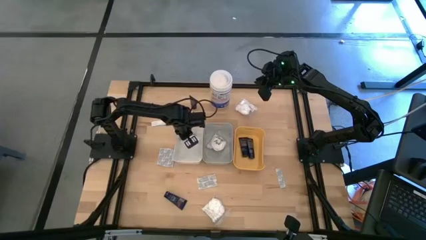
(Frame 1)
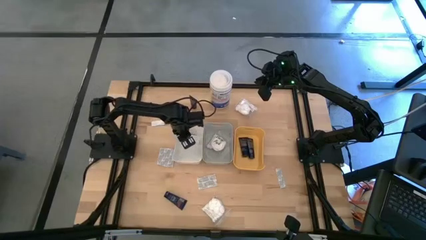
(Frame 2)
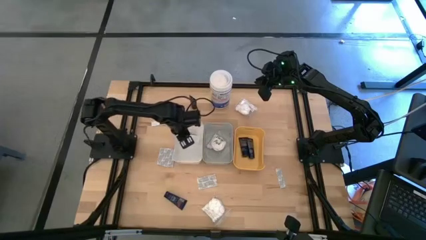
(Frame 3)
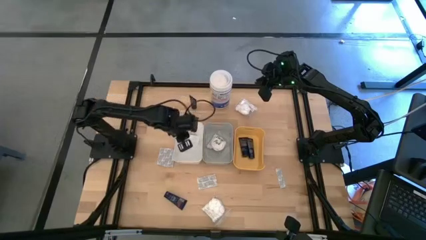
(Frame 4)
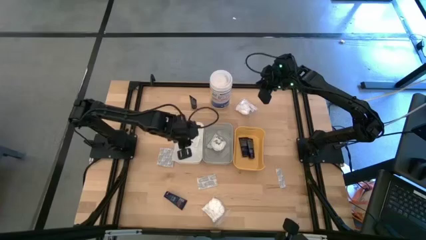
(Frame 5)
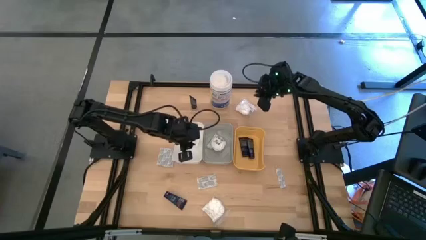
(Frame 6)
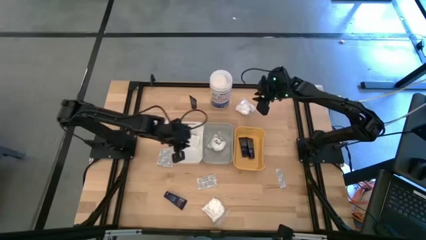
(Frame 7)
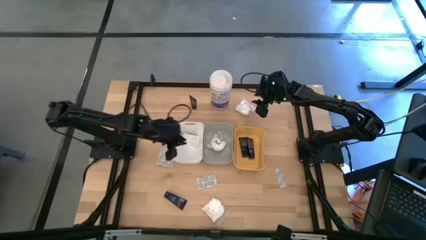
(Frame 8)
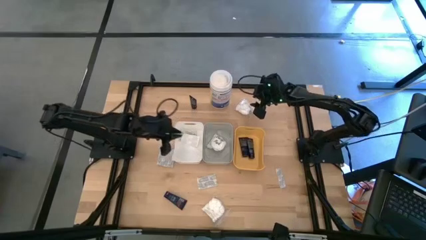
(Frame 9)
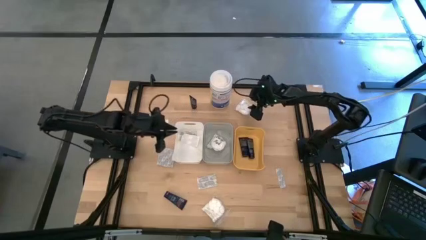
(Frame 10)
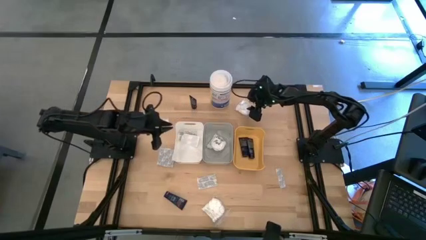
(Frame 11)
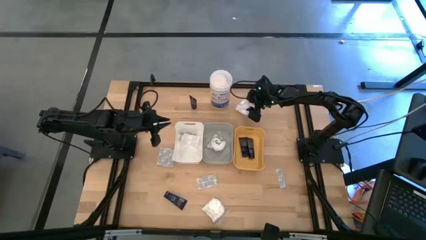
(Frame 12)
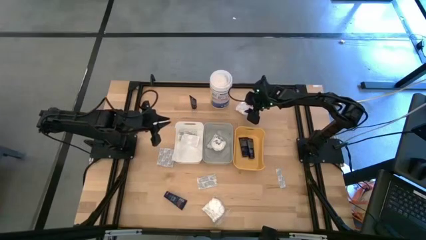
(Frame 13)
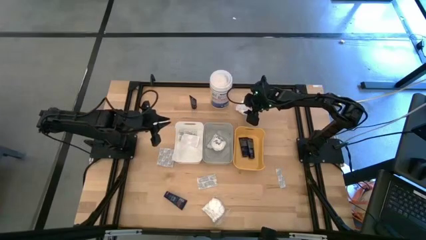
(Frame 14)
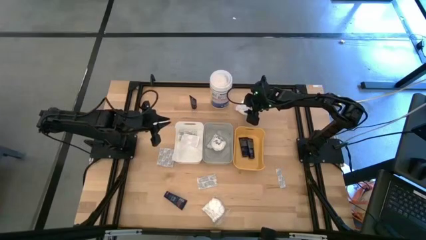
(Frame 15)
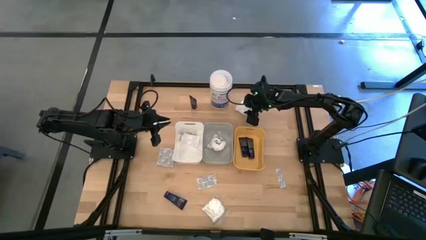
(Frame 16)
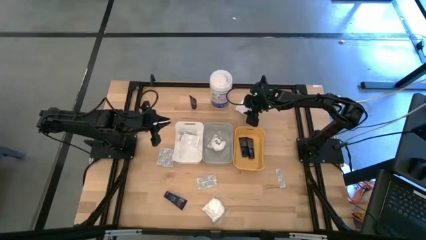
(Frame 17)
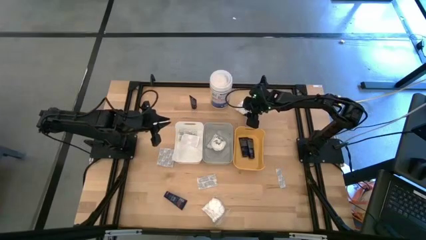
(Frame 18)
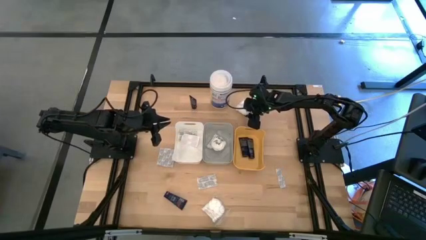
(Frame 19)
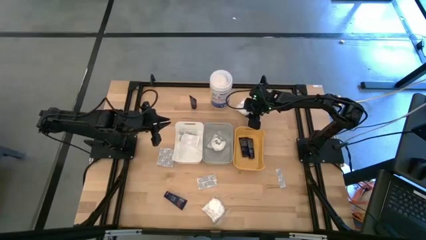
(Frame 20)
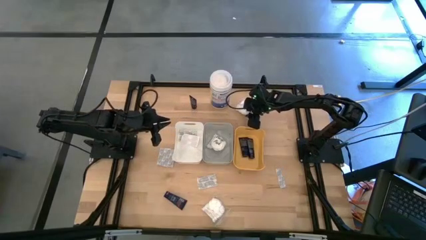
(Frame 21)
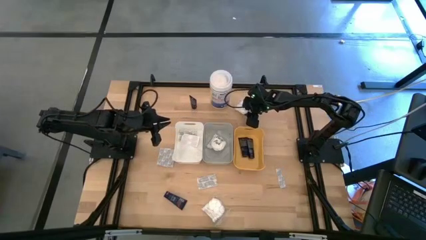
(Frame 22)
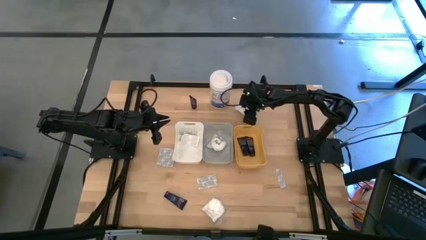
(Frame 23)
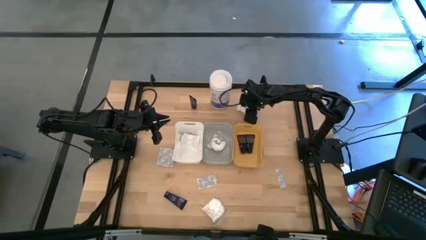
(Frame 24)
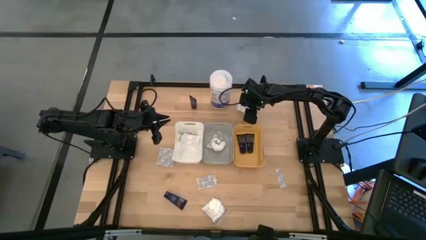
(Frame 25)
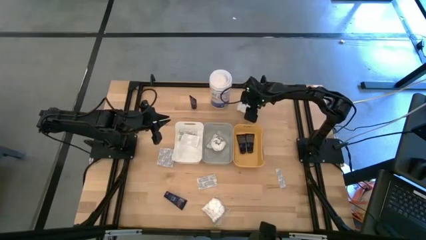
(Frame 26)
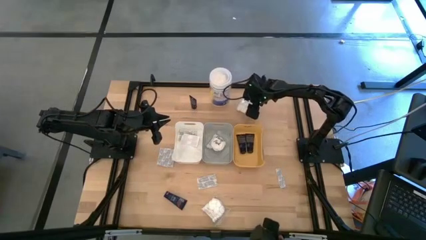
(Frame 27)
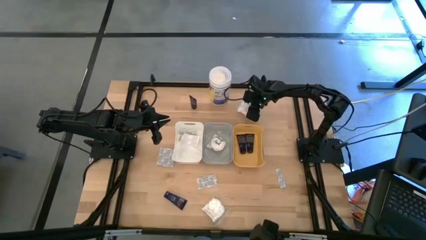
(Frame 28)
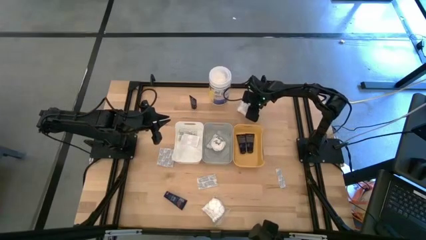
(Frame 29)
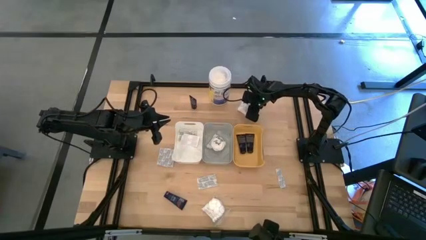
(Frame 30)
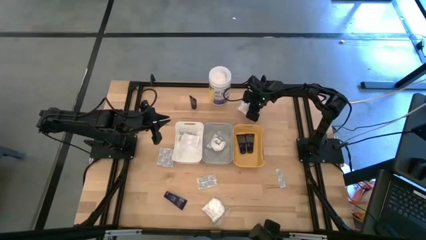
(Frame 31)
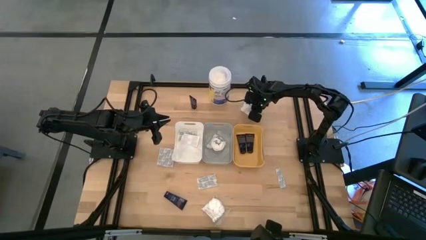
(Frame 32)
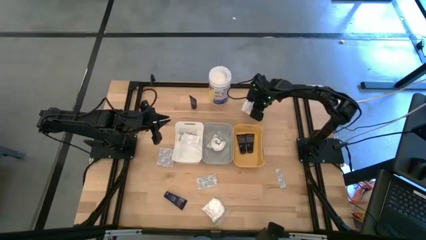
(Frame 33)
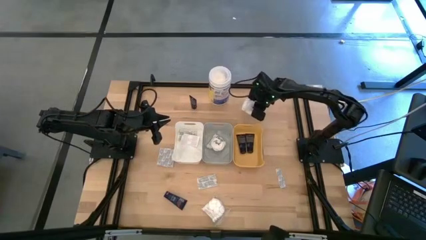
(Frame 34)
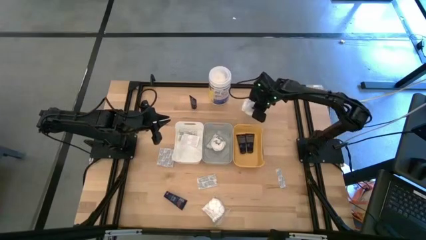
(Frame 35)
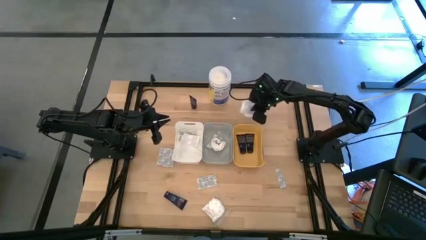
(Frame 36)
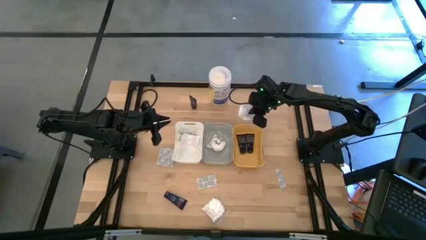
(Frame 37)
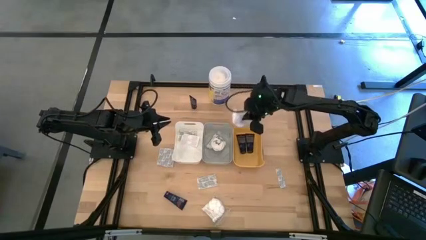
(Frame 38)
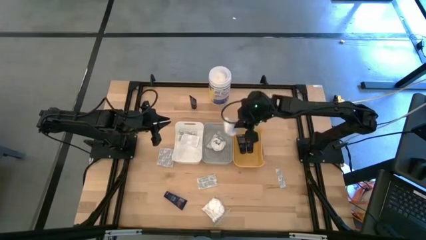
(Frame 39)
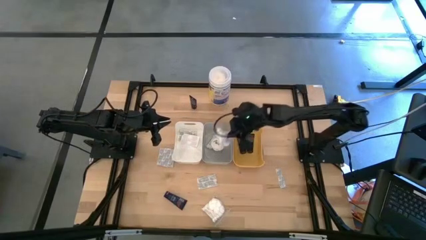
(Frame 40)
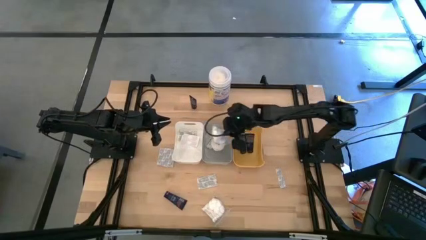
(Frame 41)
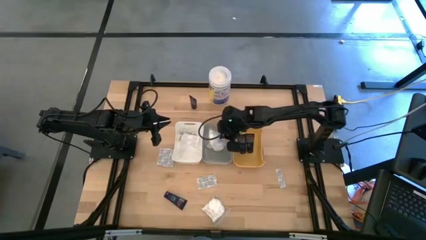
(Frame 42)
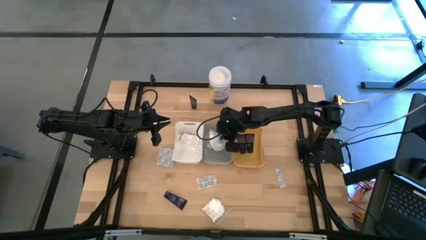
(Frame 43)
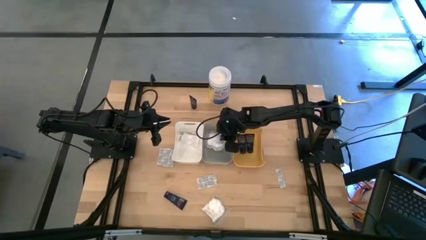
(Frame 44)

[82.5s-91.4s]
Task: Pick & Place Travel size toiletries
Put the white cotton pack into the gray bin

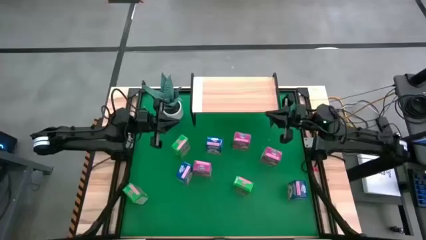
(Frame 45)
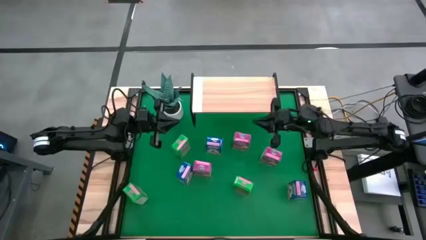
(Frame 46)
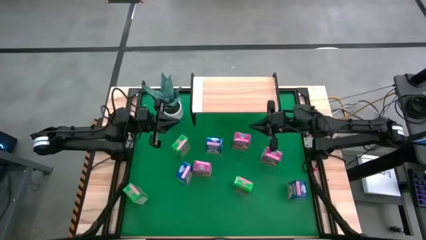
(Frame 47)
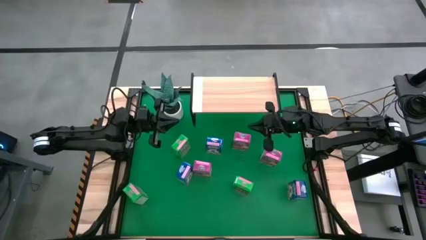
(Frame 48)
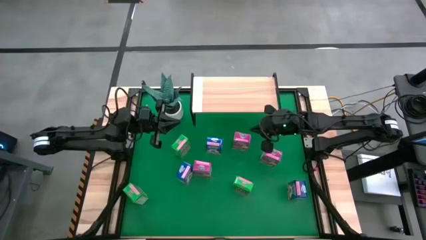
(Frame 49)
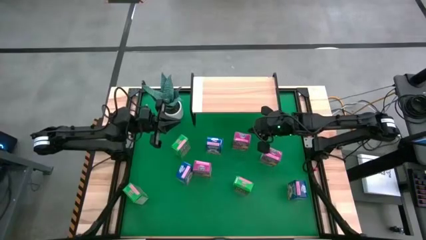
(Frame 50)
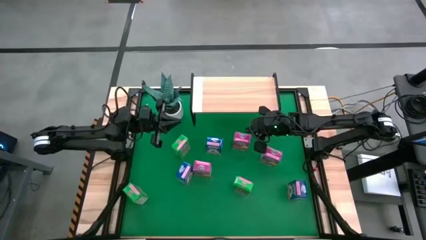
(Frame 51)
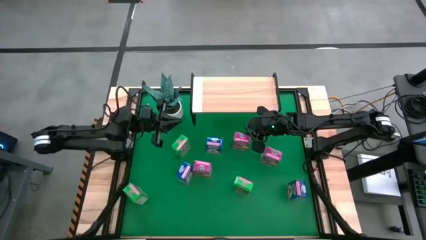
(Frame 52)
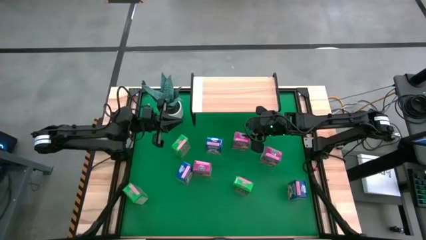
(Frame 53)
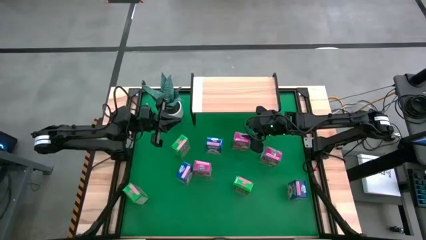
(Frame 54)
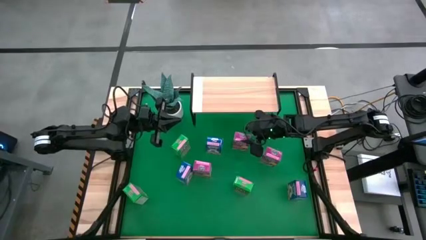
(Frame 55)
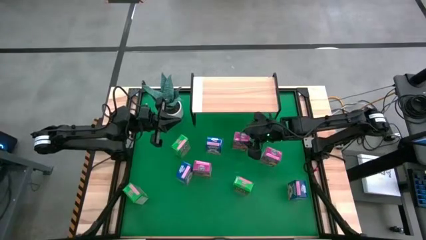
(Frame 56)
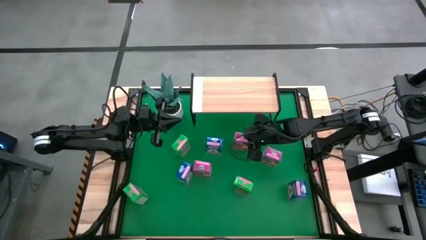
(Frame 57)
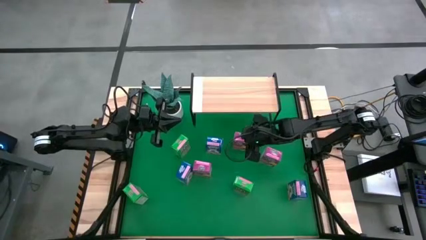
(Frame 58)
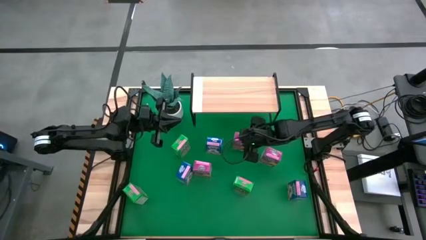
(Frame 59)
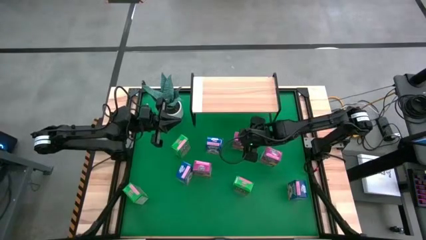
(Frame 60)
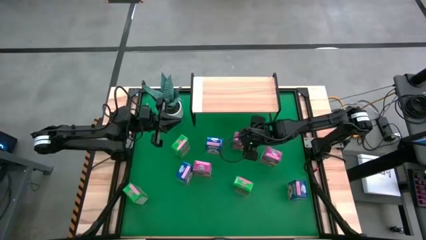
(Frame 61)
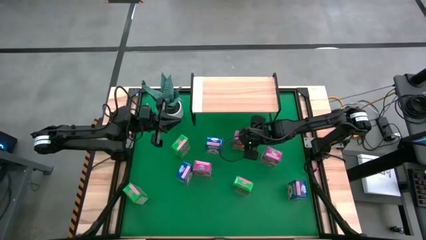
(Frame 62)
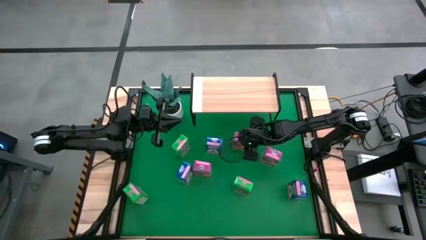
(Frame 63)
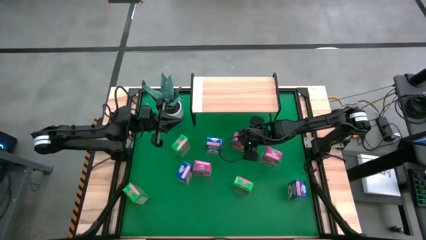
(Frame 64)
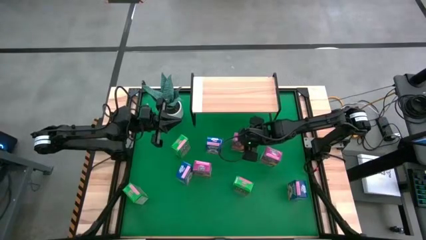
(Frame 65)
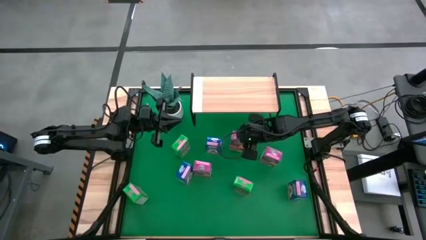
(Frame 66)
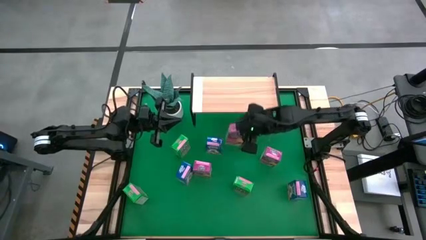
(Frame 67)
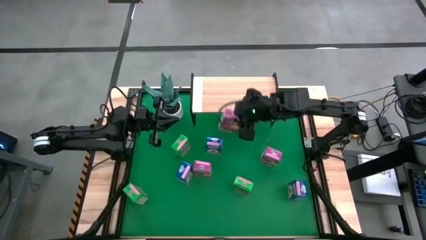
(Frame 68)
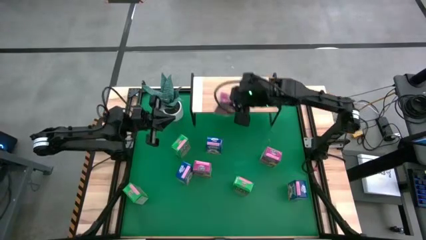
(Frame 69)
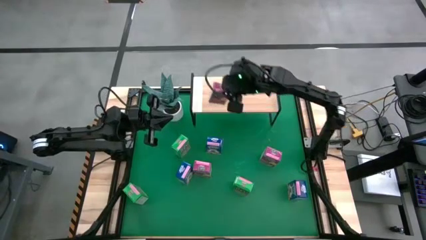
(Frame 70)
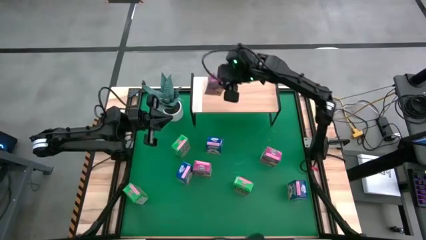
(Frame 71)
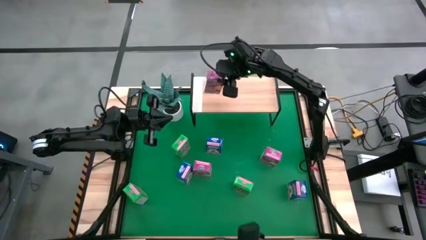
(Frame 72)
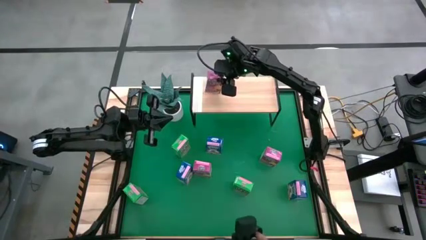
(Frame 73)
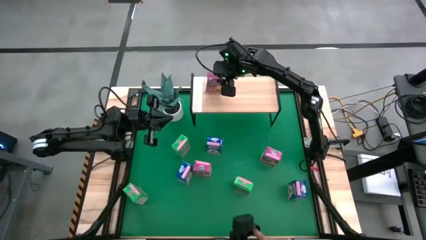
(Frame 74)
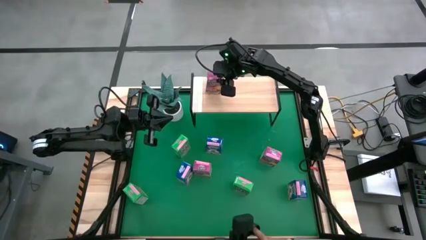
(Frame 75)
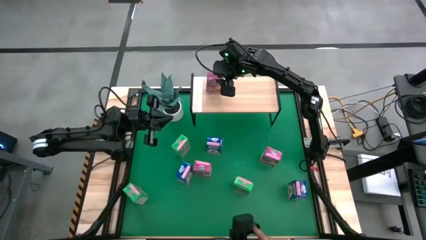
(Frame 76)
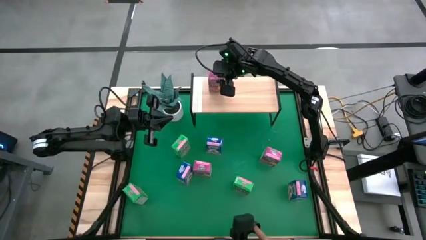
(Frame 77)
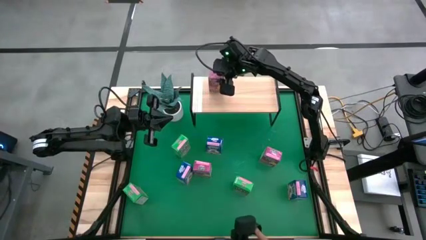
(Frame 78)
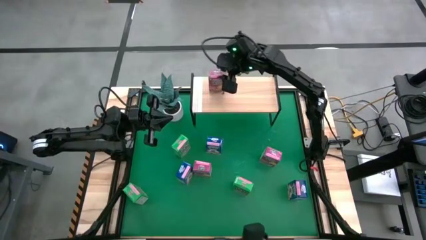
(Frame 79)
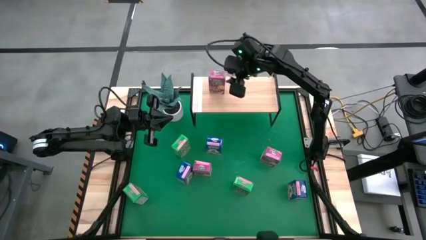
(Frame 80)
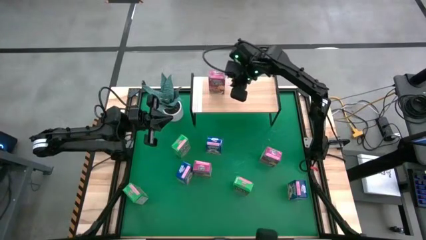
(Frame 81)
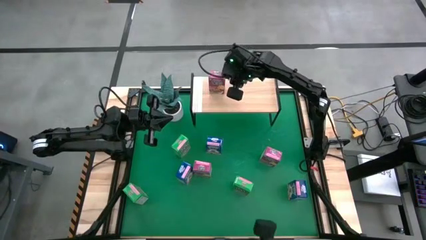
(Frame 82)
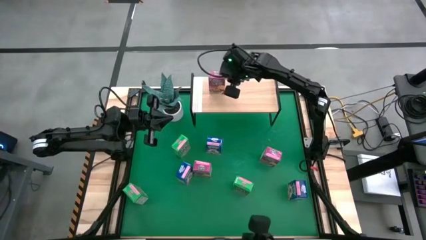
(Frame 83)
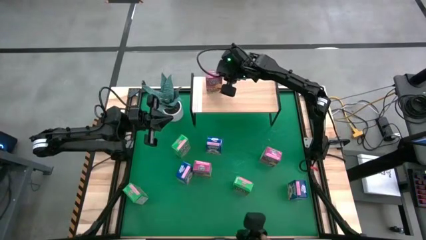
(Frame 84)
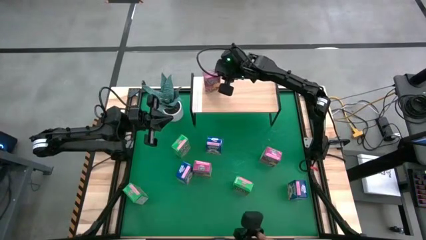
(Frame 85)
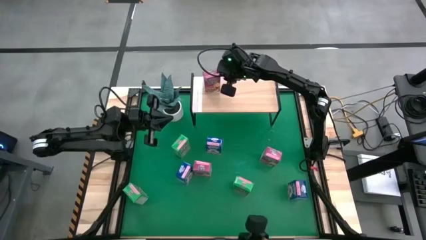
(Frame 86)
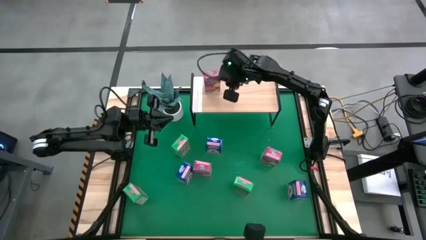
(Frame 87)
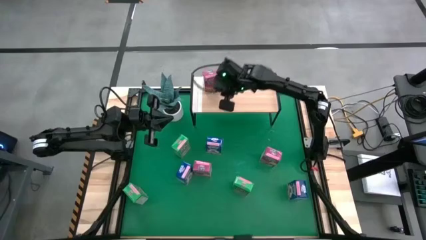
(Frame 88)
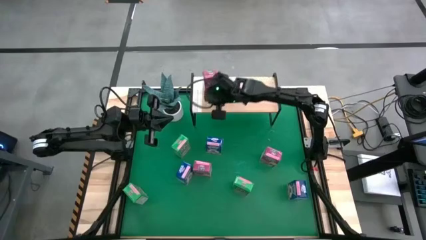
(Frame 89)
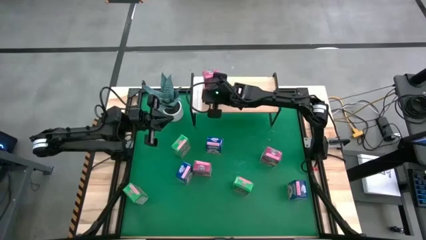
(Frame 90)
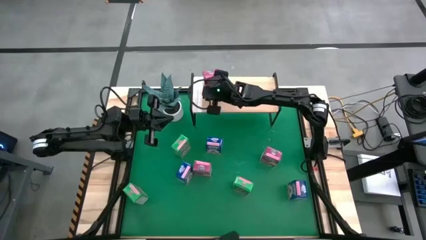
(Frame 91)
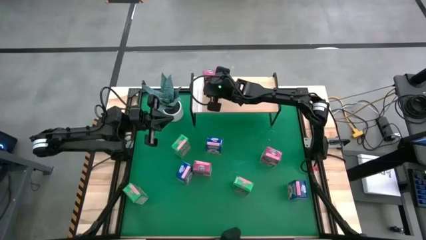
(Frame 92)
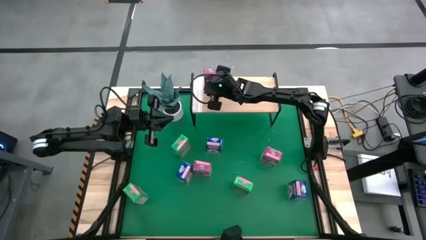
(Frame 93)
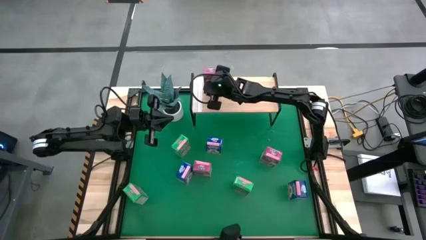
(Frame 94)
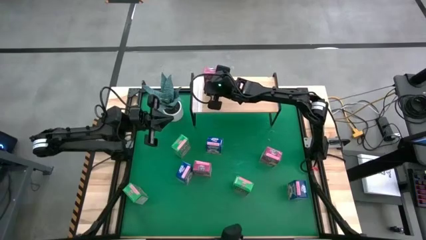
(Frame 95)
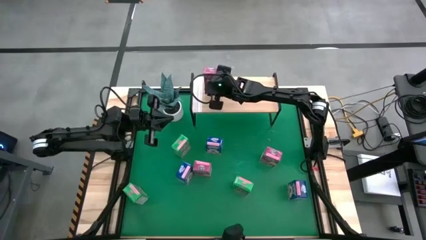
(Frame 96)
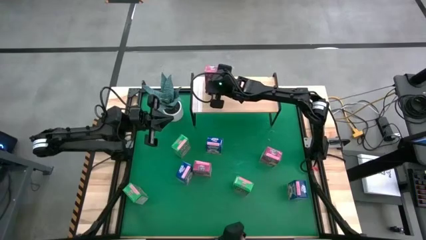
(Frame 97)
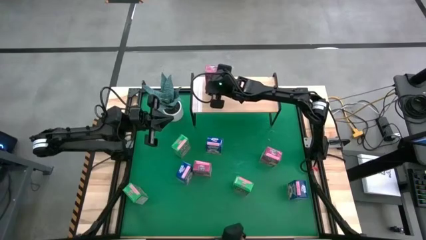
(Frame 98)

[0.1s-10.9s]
Task: Stack cereal on shelf
Put the top violet cereal box on the shelf
